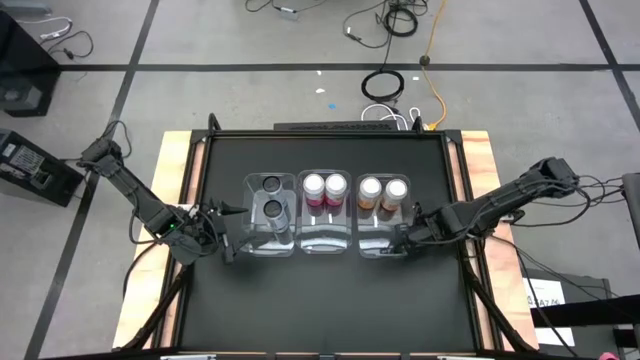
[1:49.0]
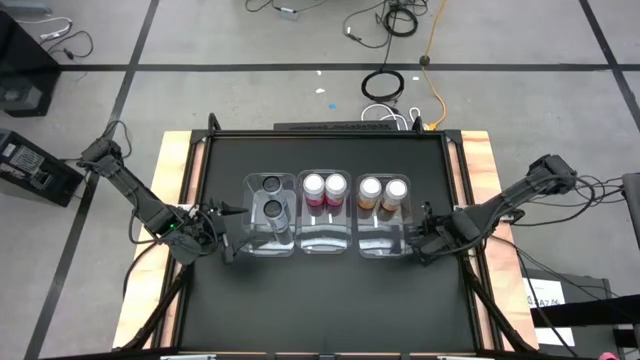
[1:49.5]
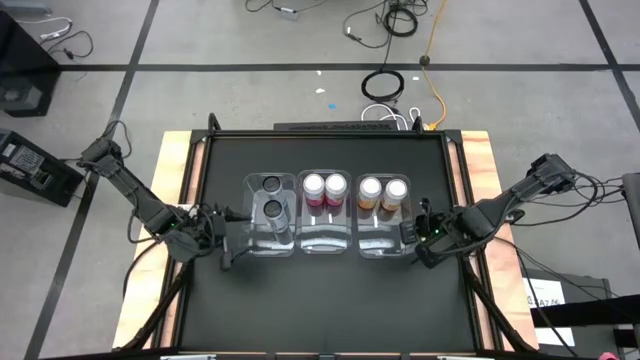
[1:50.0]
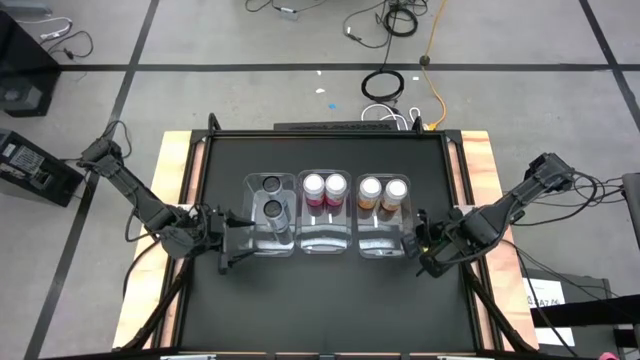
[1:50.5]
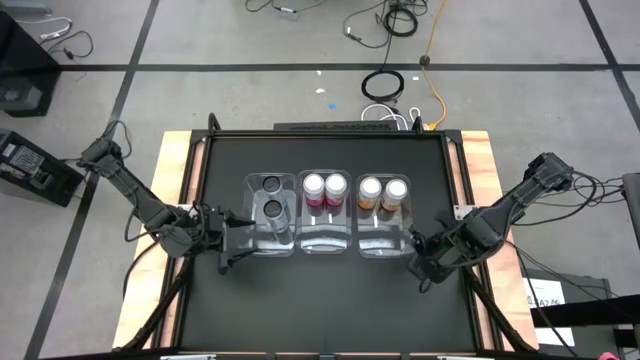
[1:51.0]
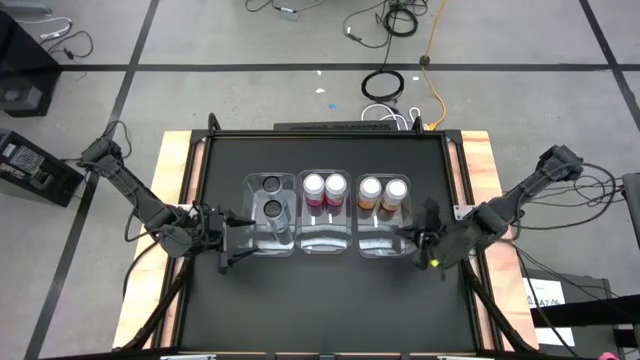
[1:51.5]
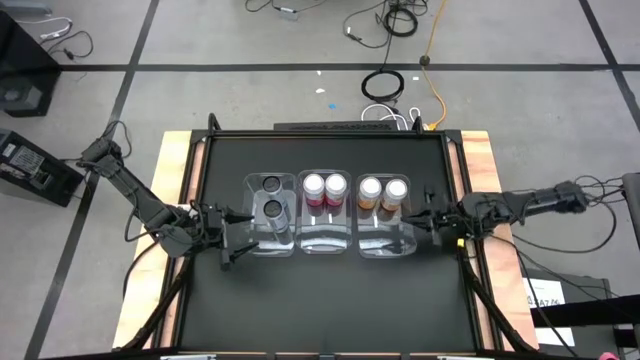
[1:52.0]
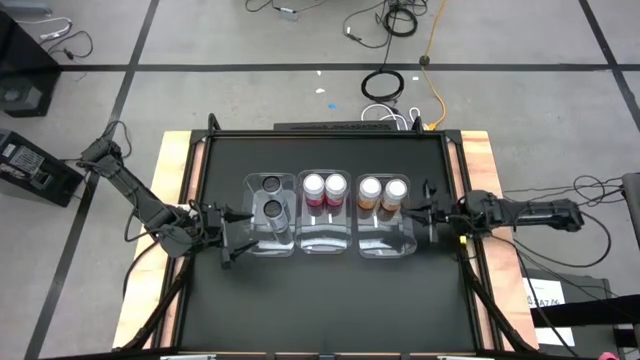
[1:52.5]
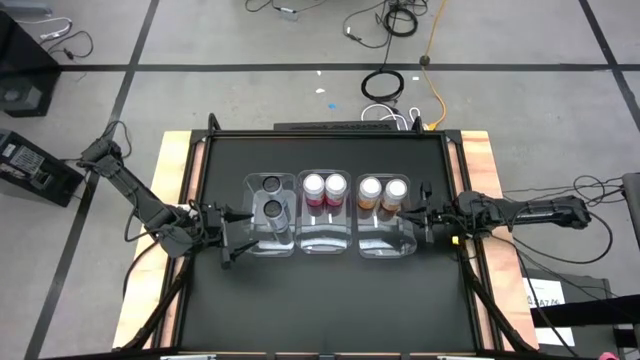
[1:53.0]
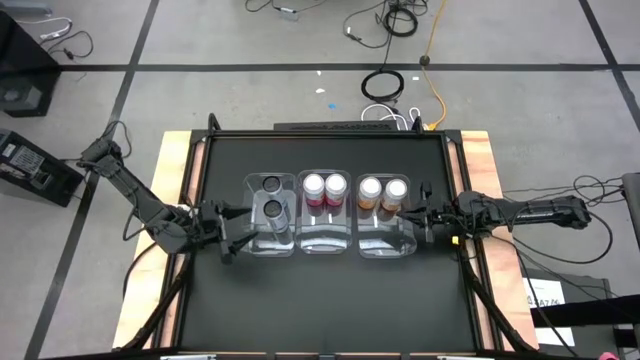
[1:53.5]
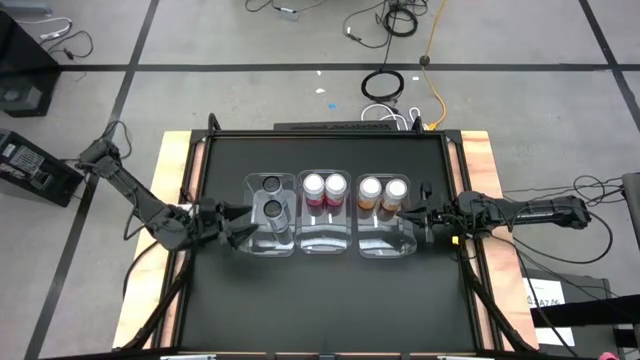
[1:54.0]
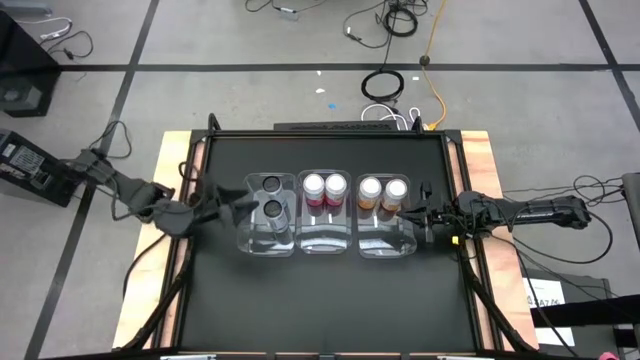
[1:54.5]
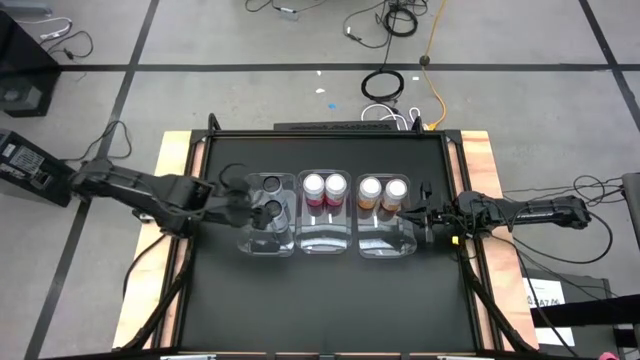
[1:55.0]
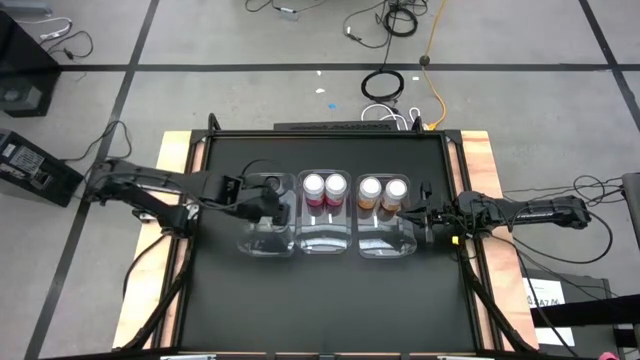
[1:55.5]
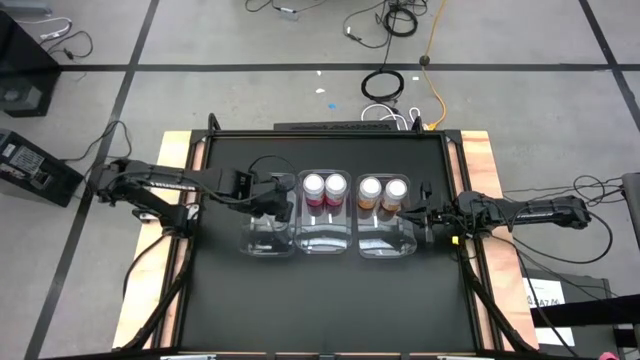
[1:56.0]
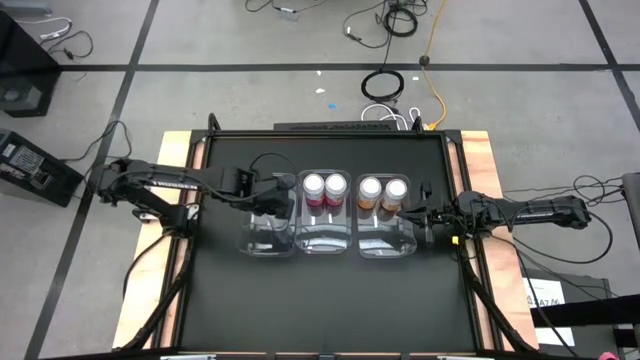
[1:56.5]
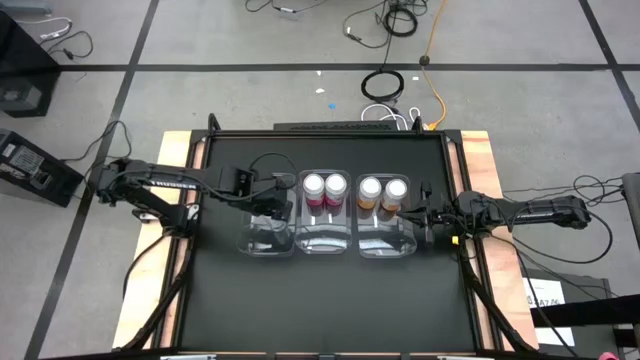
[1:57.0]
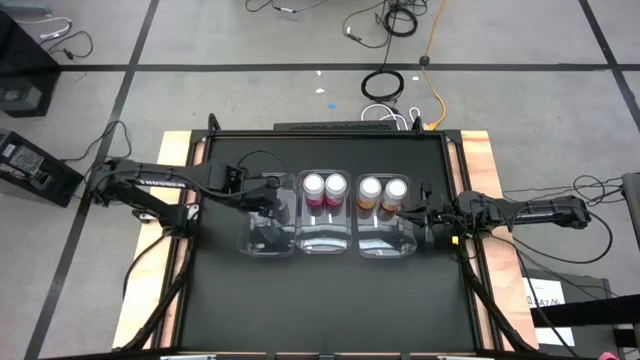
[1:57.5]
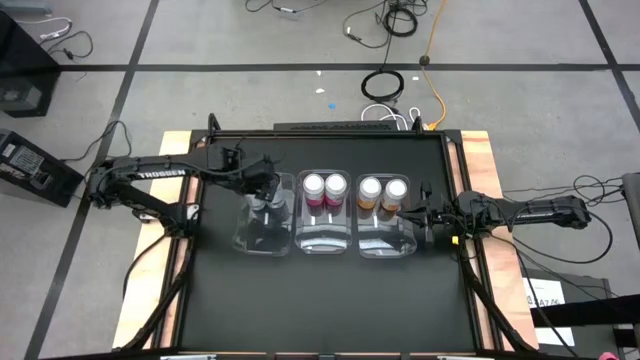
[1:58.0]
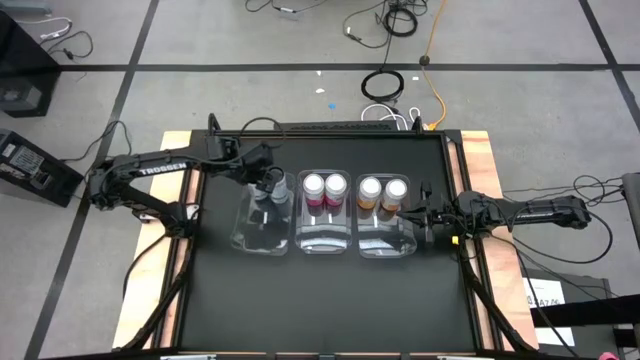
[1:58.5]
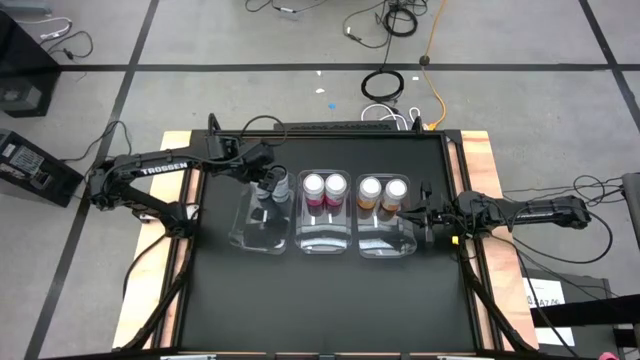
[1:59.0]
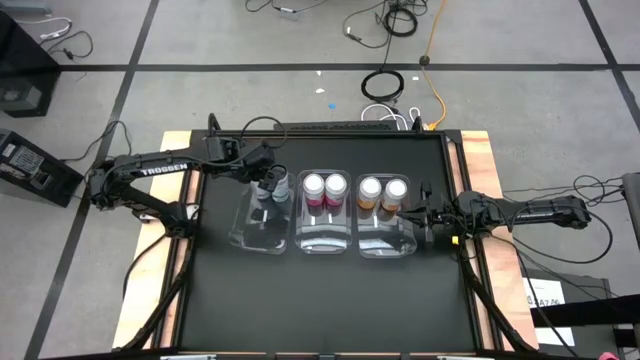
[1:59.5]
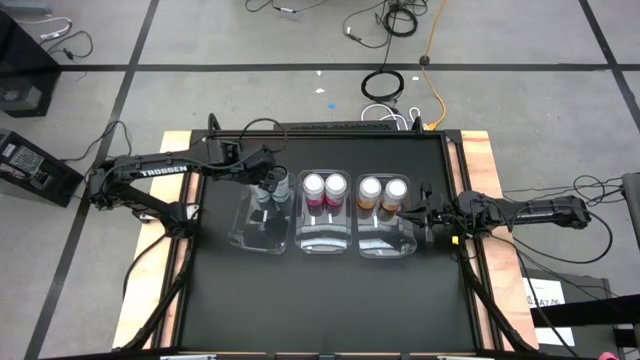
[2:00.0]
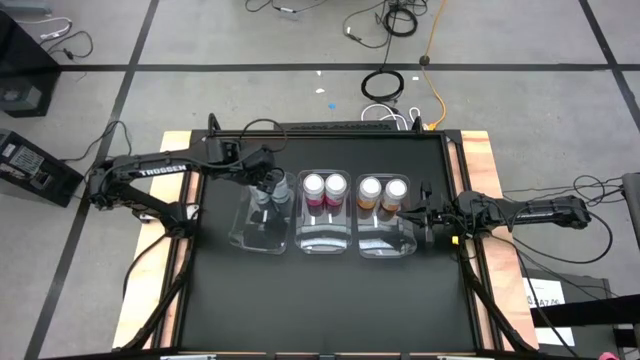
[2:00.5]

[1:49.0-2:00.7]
Task: Sort soda cans
Adjust the bottom blue soda can in the left transparent bin

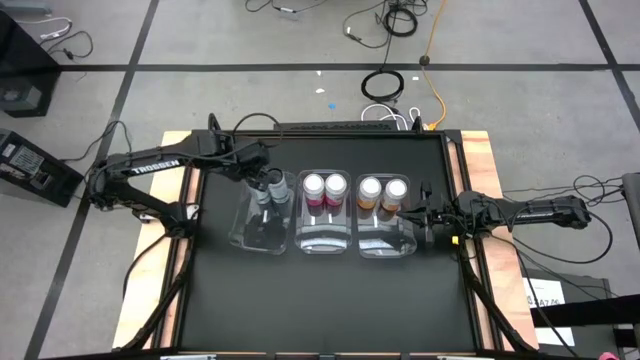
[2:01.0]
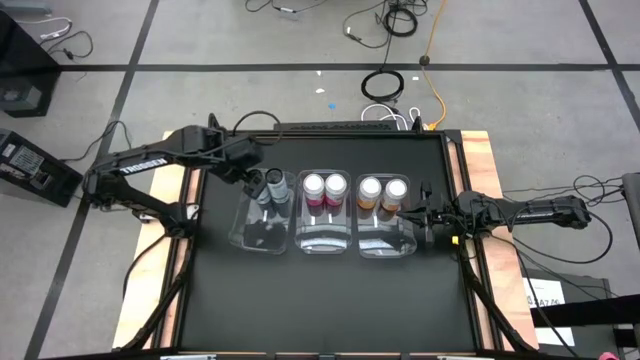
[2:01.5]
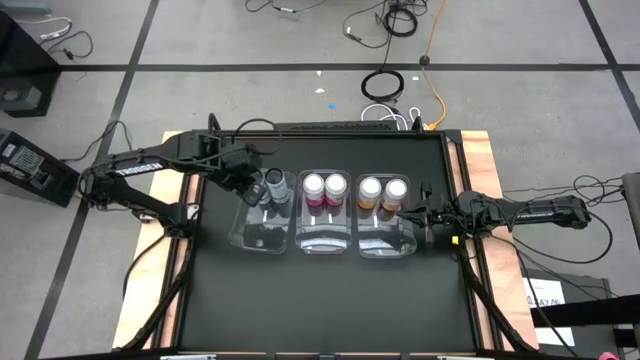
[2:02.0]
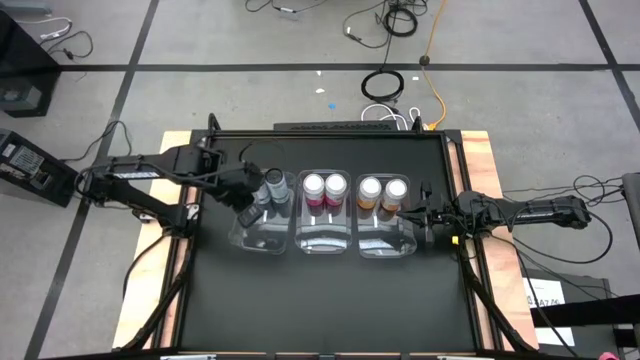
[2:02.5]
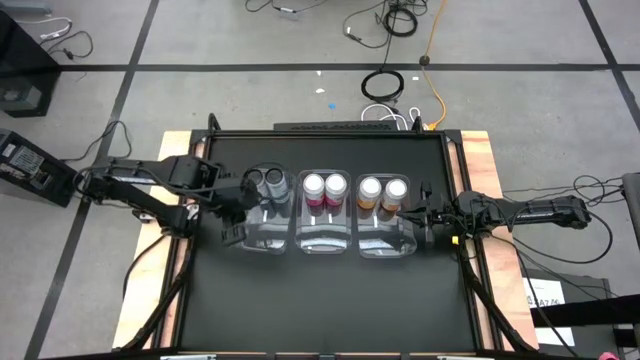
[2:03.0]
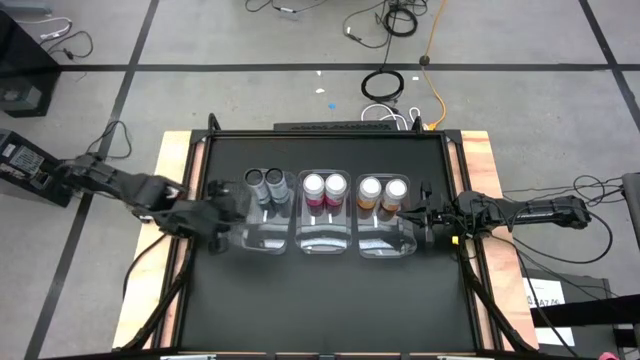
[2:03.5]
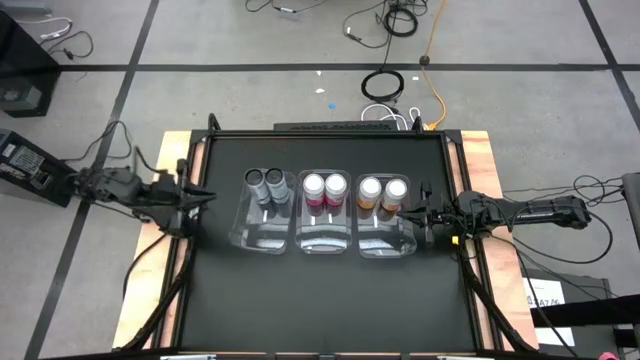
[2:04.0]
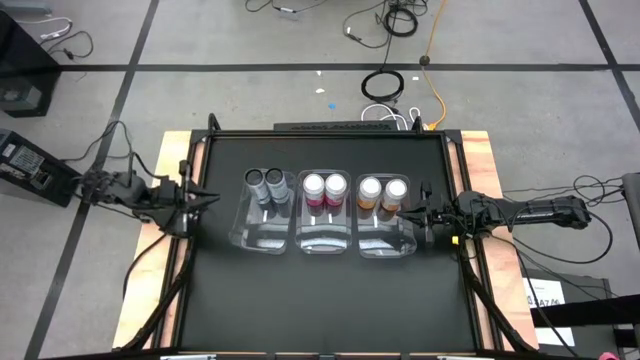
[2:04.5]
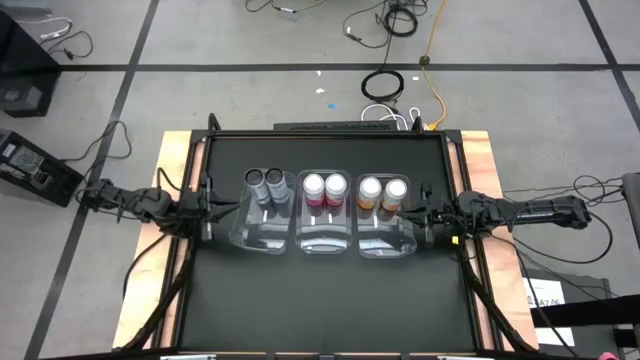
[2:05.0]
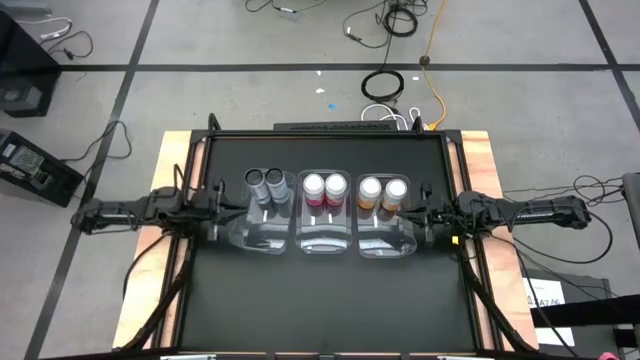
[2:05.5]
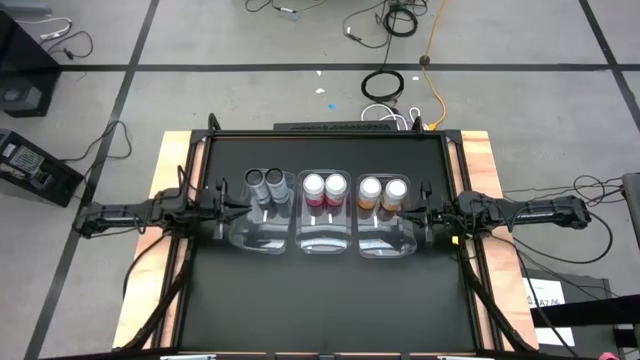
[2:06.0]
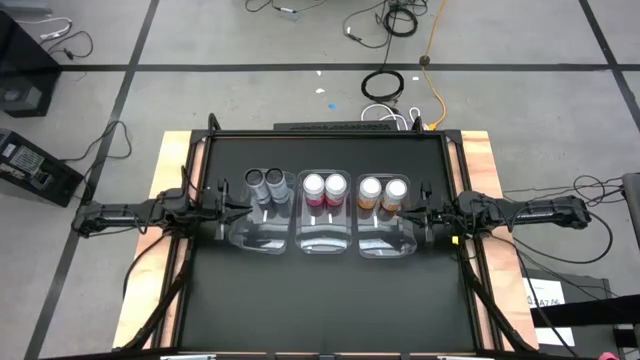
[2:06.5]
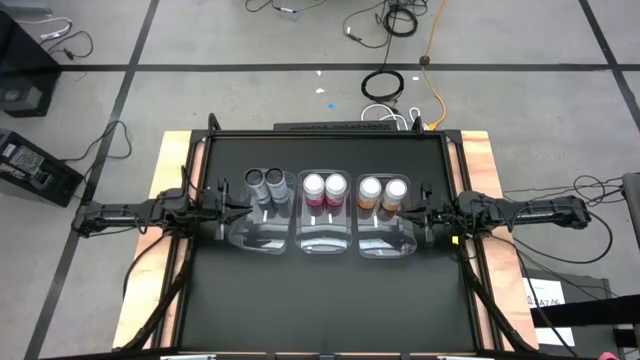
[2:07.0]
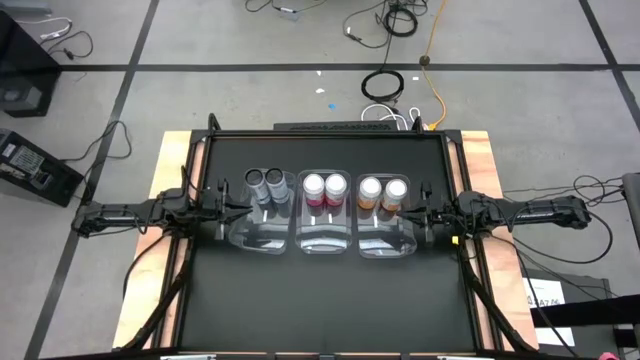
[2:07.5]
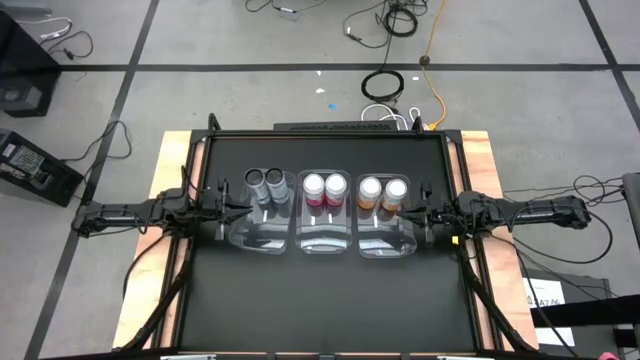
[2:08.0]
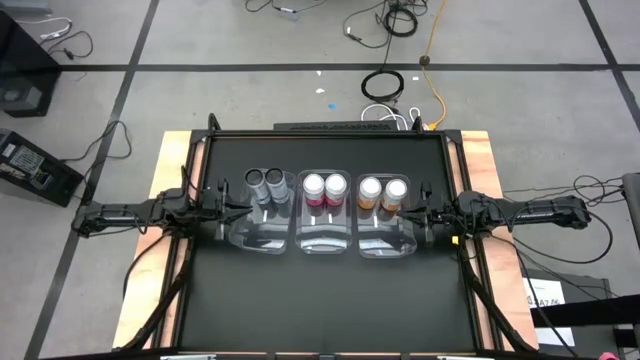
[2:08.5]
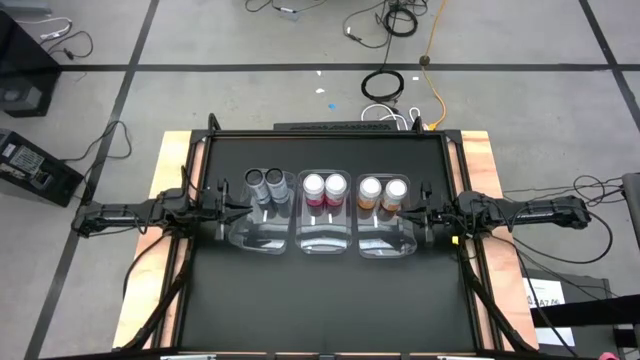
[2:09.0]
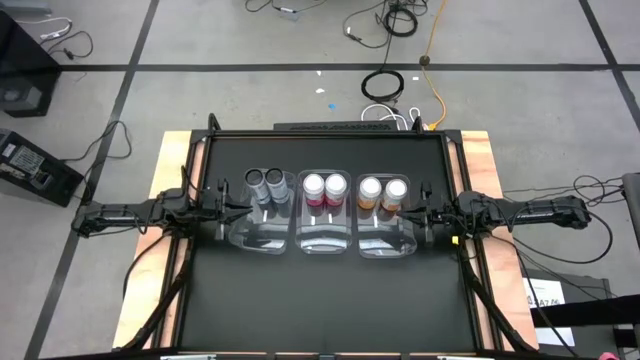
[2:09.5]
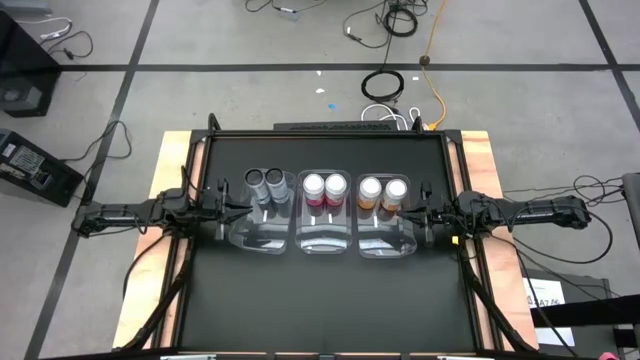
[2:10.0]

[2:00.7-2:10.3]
Return to home position
